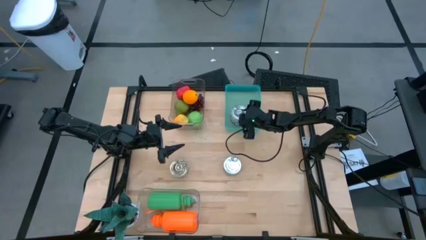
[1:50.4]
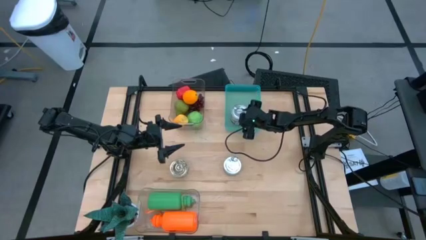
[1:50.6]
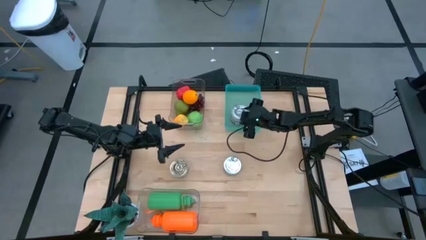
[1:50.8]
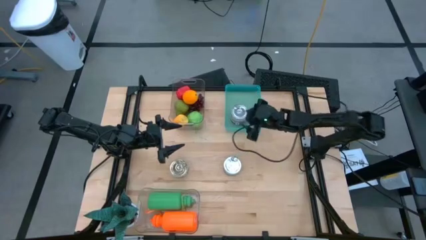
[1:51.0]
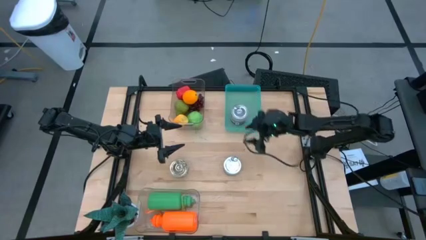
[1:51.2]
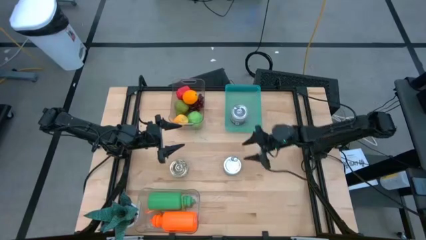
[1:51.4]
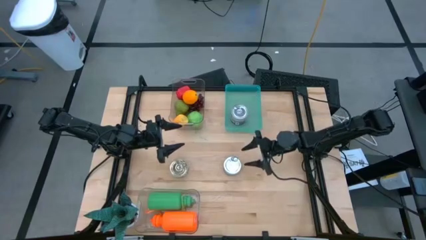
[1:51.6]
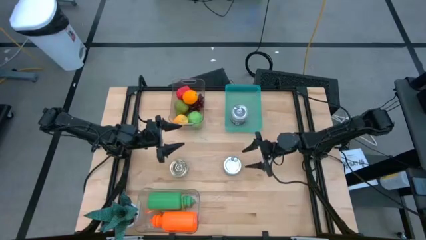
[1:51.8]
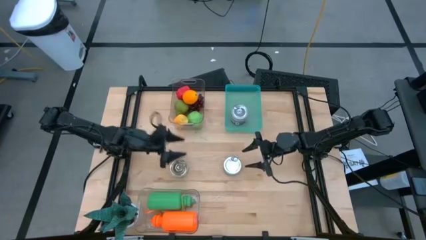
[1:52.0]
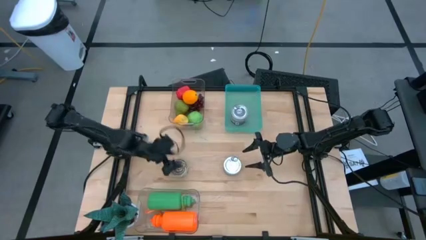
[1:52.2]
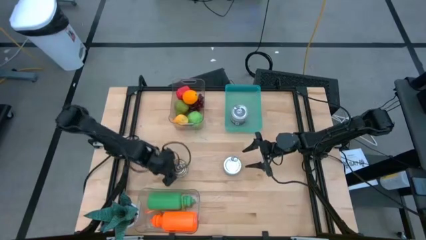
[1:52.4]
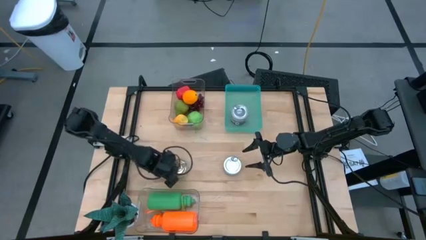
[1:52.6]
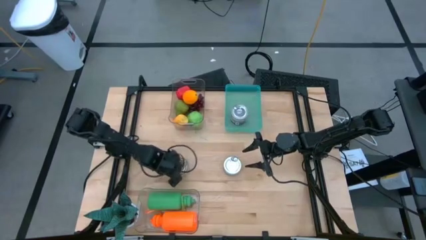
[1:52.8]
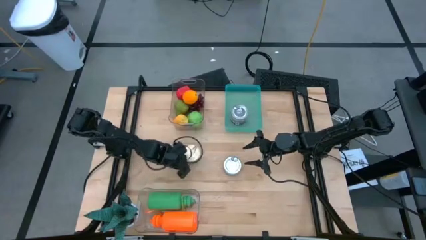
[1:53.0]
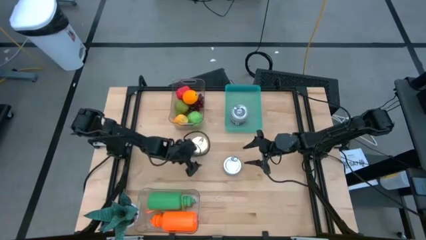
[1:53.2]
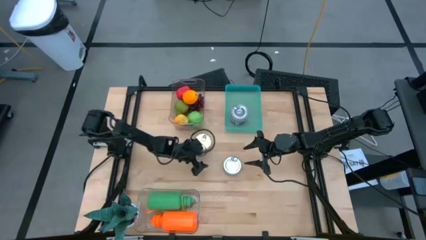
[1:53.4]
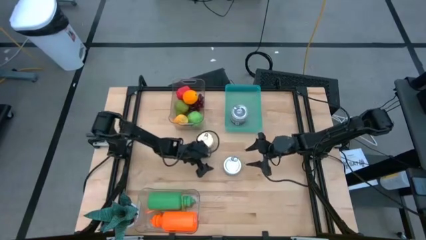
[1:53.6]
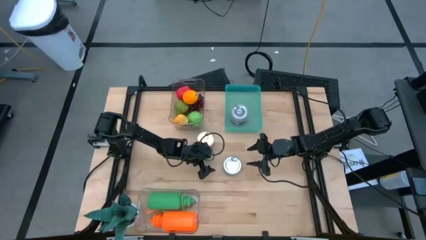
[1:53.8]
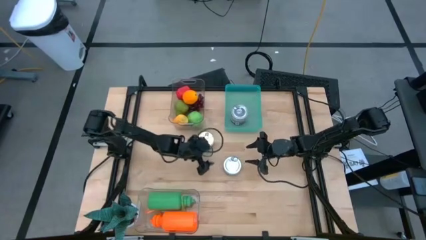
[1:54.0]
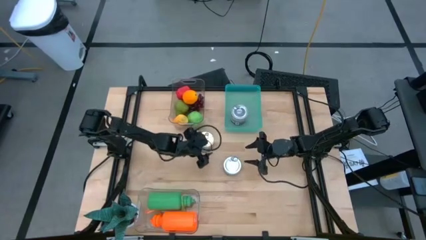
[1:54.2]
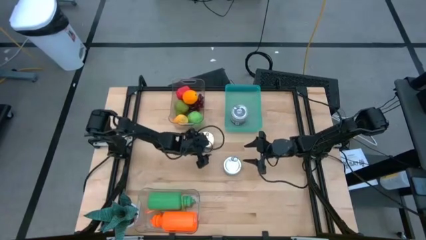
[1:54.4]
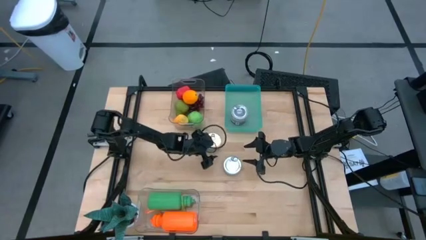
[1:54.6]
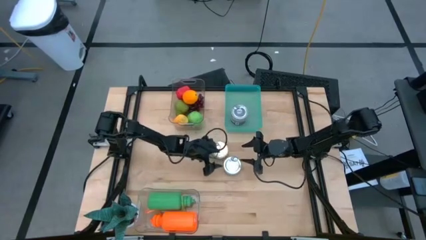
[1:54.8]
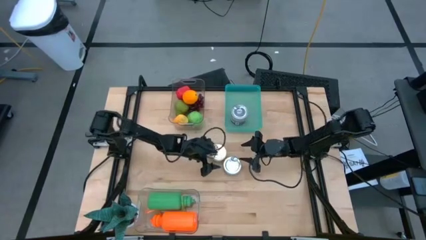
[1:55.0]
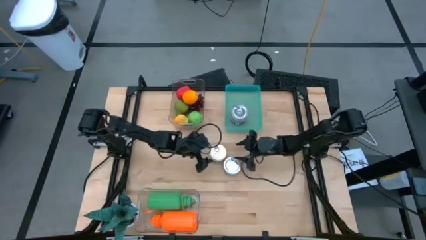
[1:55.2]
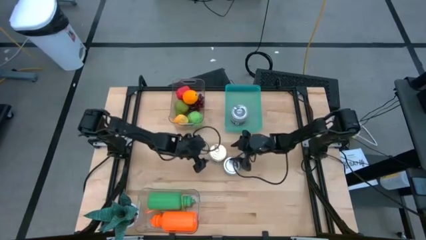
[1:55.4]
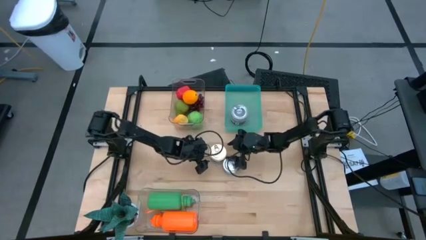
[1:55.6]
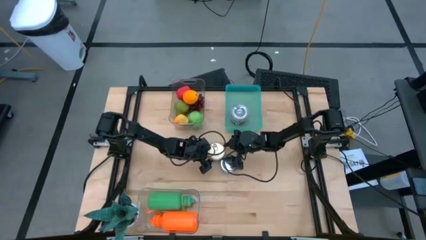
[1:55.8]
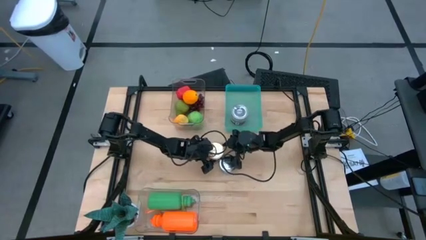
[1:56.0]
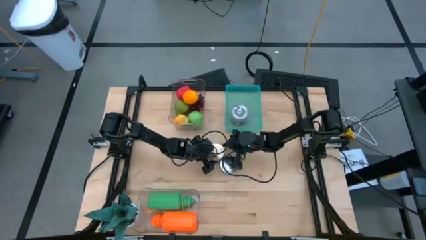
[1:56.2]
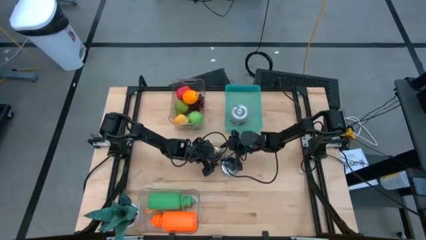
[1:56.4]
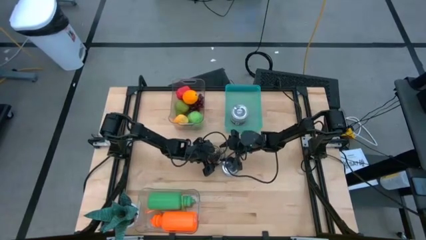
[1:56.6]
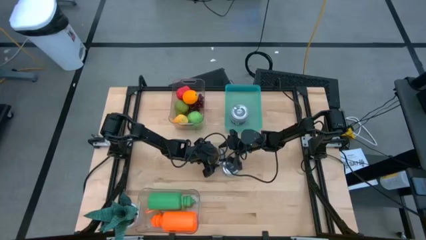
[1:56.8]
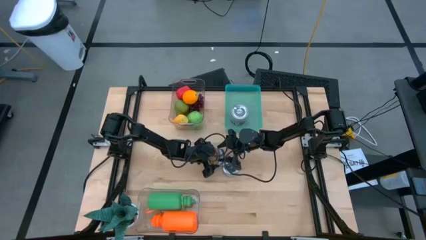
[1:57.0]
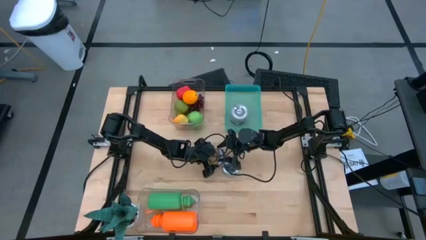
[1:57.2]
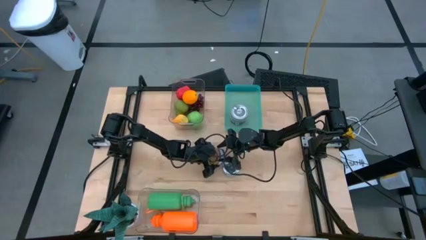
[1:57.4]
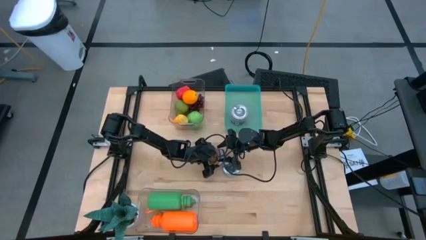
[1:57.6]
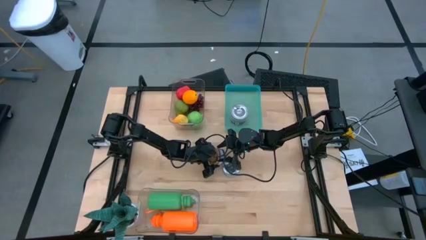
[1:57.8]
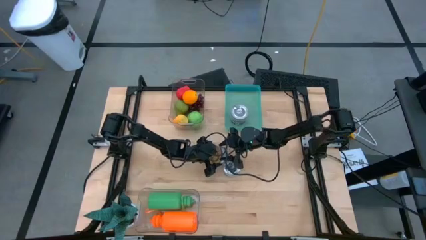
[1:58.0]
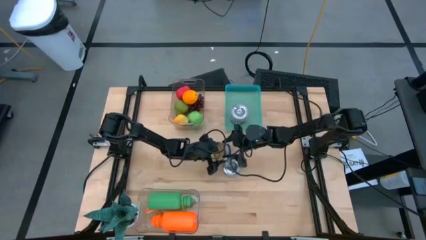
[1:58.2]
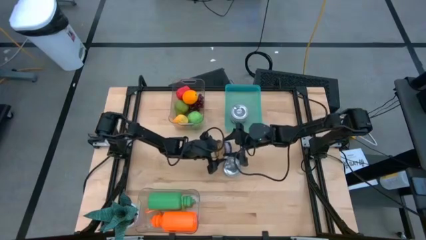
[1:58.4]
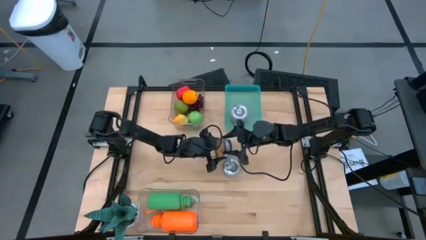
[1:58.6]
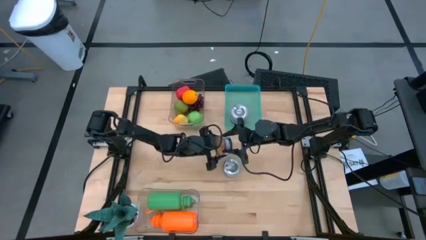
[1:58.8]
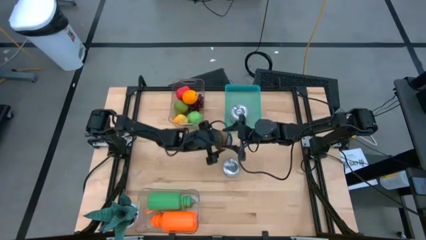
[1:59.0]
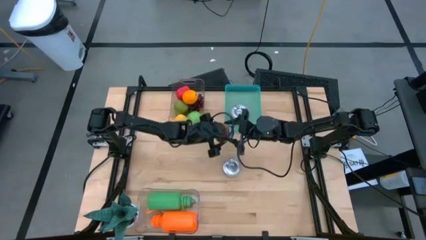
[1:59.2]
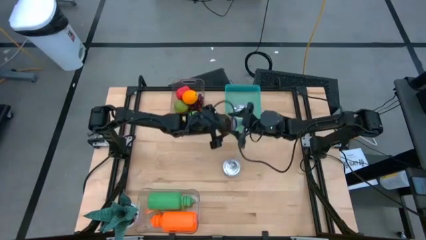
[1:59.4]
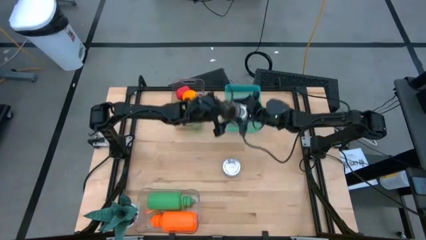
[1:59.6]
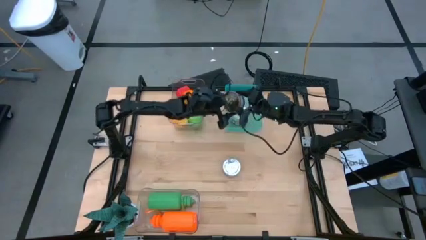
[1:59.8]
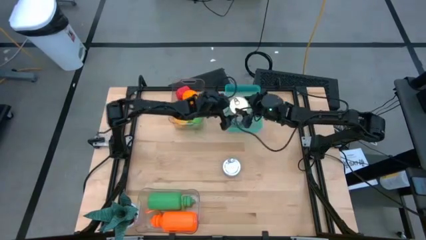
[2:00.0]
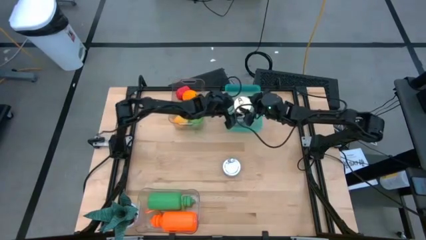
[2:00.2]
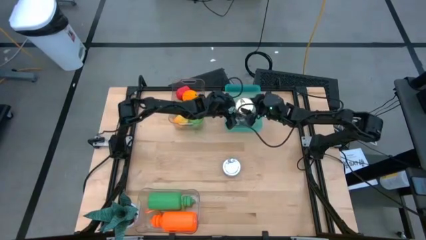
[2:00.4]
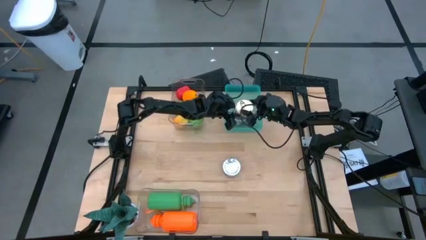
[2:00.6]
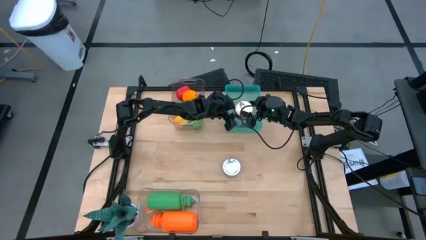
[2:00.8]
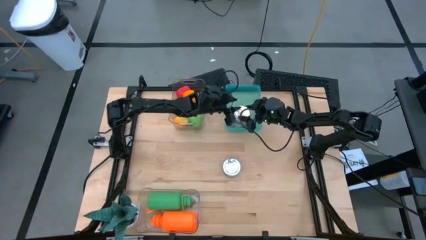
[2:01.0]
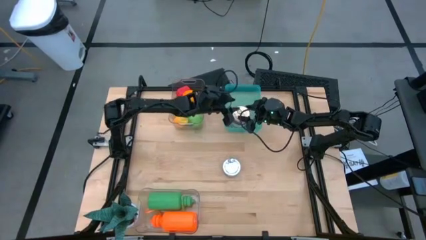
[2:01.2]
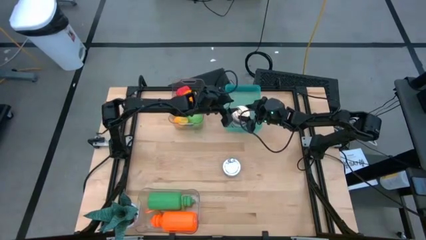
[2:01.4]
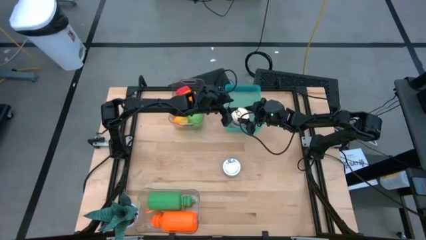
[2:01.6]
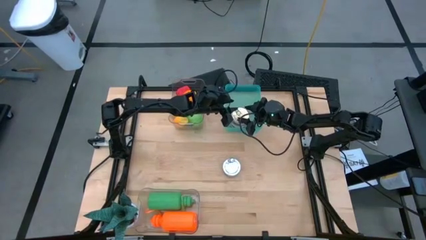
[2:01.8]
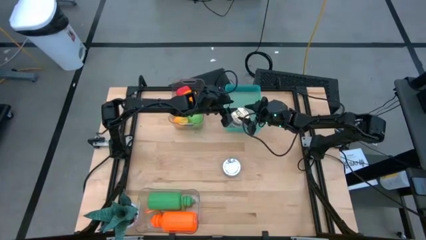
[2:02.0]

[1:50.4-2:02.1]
Task: Pick & Place Food Item
Put the blue pink tuna can into the light blue bin

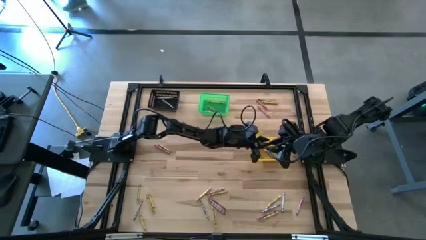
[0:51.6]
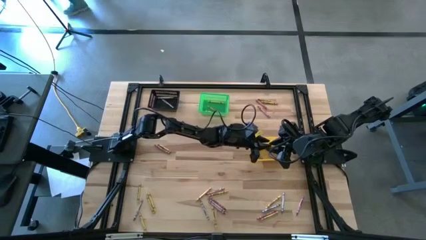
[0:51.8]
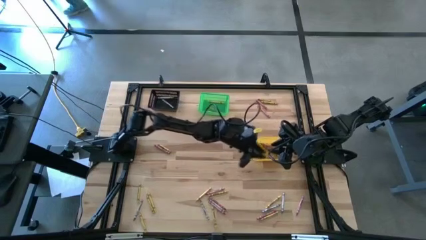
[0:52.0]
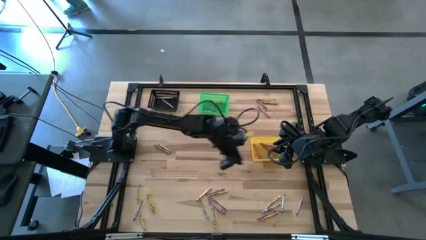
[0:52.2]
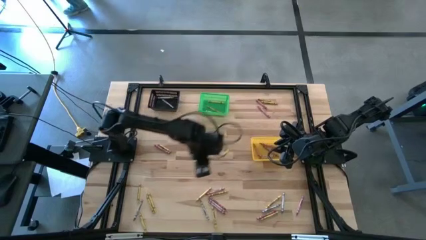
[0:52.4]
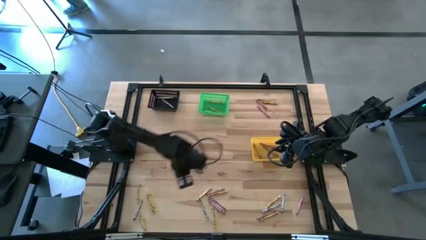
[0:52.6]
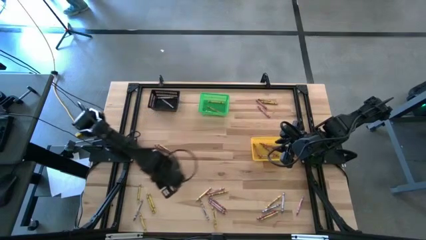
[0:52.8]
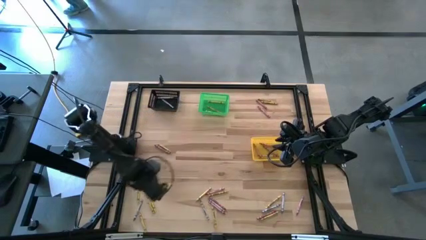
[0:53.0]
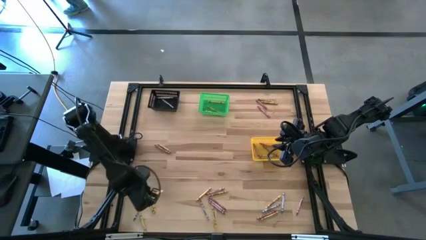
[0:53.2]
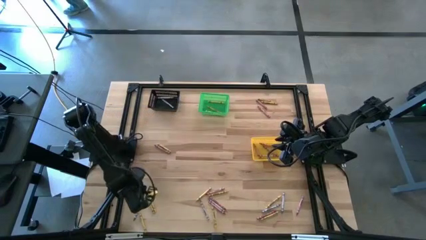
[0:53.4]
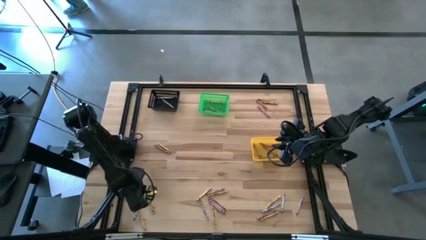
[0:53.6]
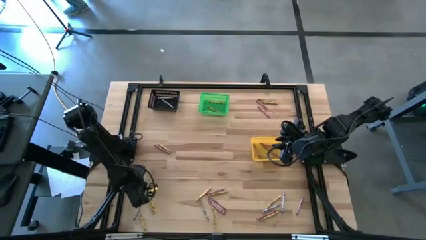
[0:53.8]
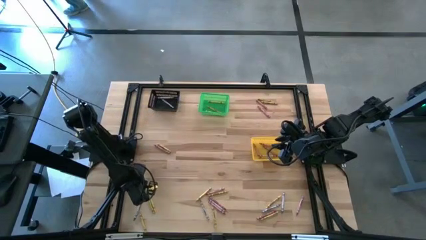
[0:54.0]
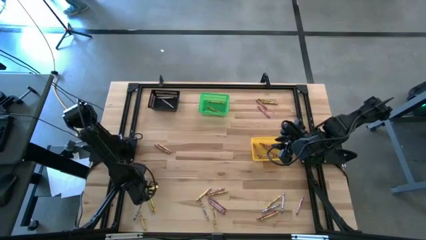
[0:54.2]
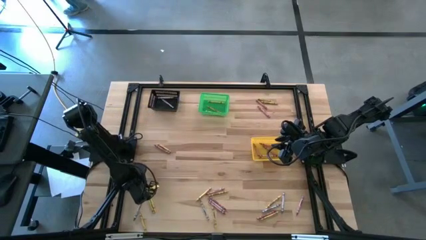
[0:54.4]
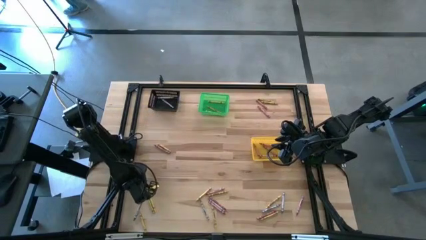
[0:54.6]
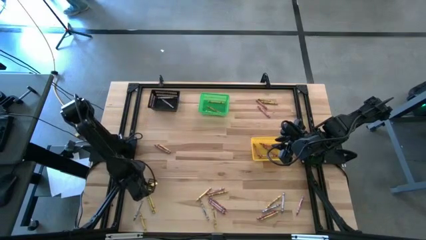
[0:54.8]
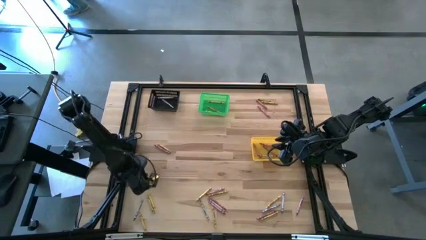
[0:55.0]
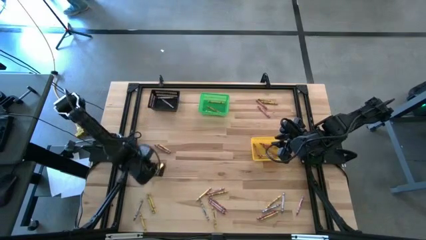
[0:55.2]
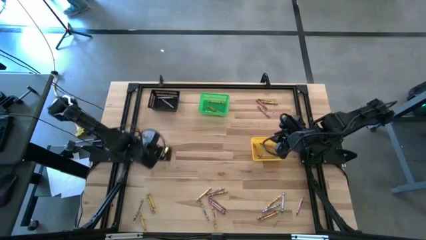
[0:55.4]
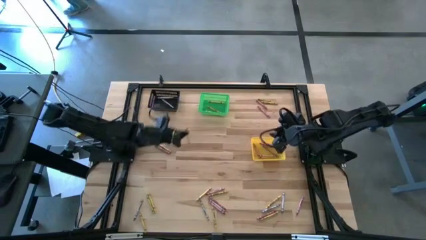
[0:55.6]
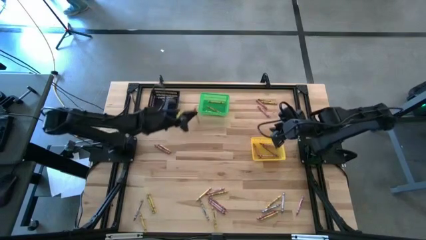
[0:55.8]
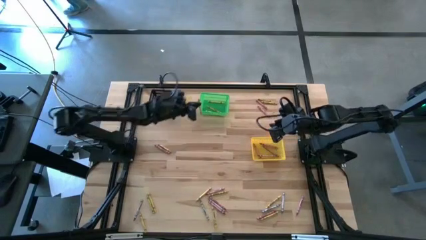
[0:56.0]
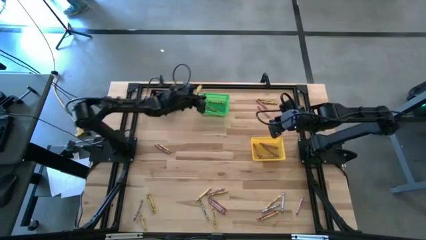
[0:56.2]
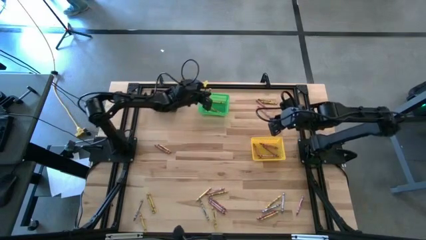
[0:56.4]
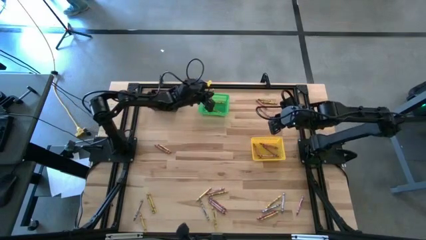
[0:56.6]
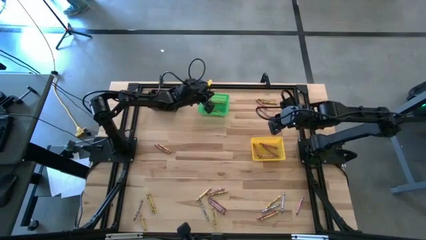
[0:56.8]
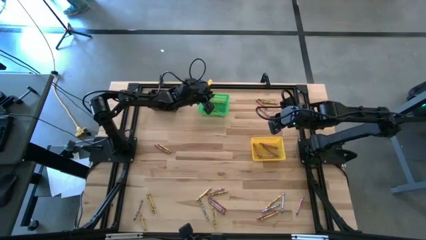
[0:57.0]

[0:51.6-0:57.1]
Task: Sort crayons
Put the yellow crayon into the green basket
